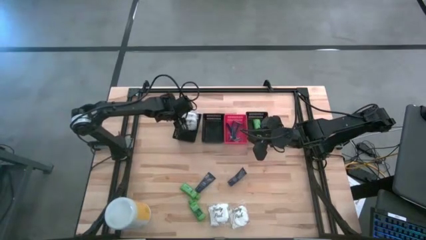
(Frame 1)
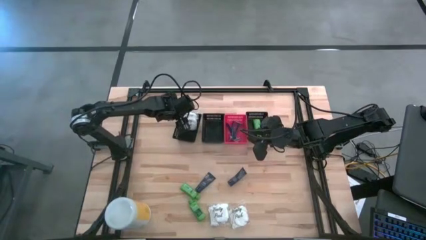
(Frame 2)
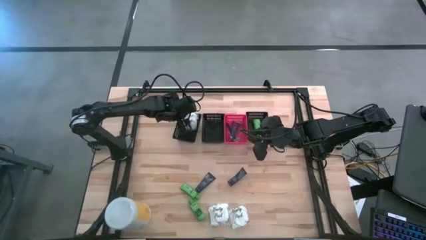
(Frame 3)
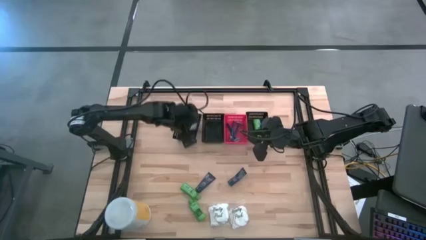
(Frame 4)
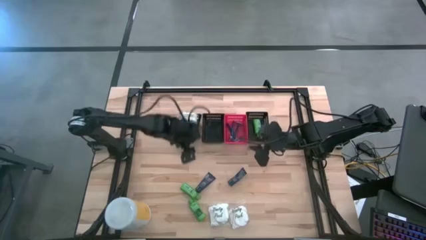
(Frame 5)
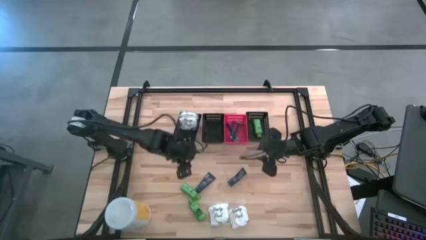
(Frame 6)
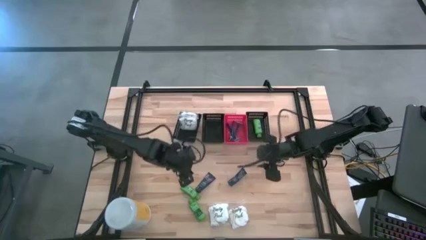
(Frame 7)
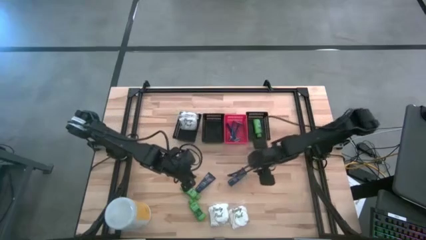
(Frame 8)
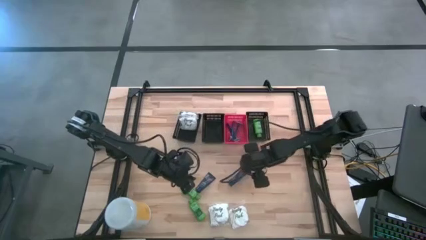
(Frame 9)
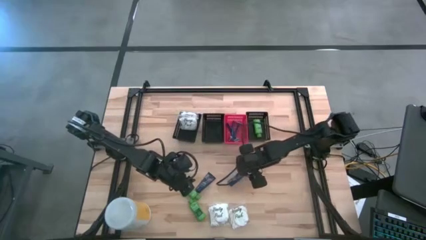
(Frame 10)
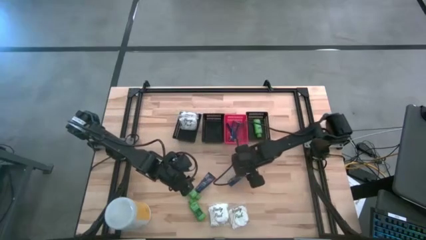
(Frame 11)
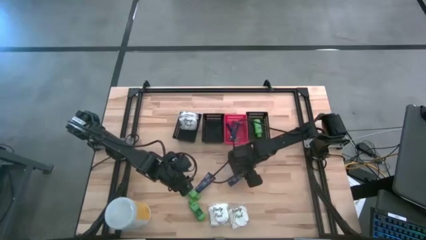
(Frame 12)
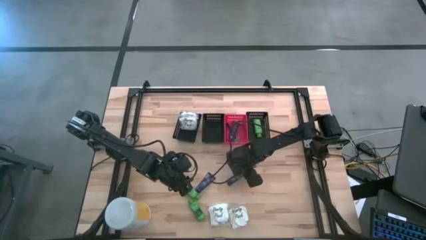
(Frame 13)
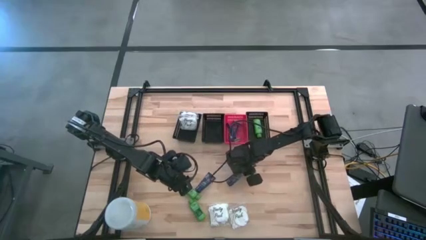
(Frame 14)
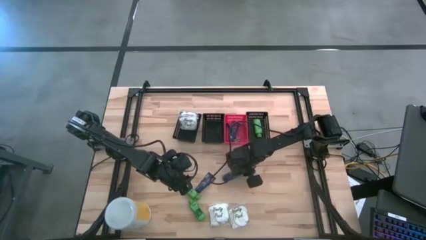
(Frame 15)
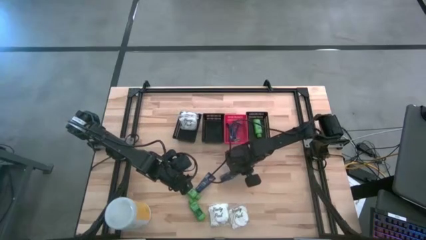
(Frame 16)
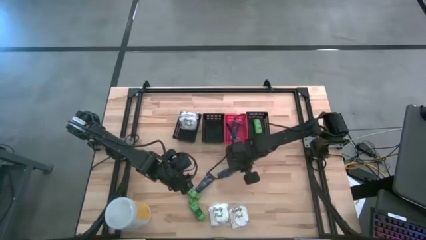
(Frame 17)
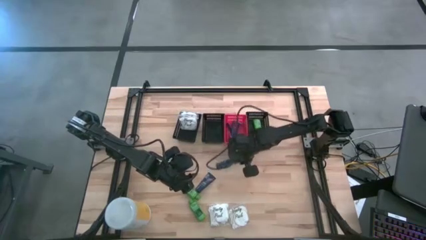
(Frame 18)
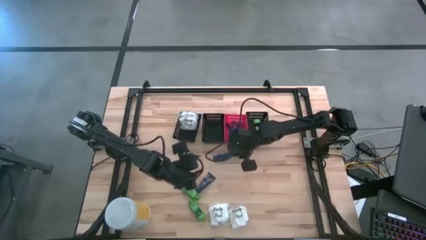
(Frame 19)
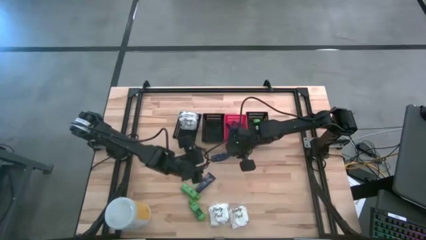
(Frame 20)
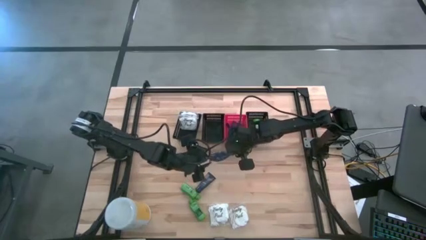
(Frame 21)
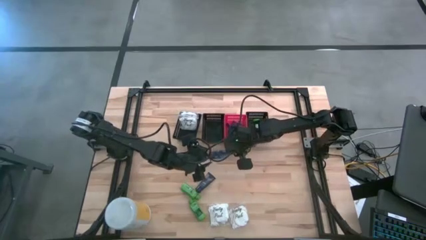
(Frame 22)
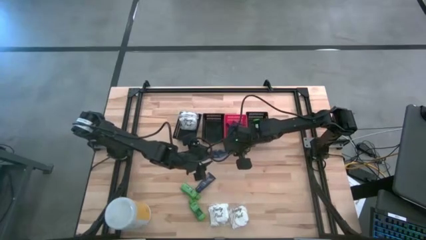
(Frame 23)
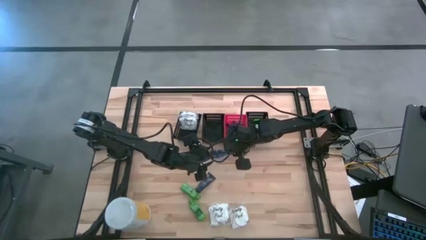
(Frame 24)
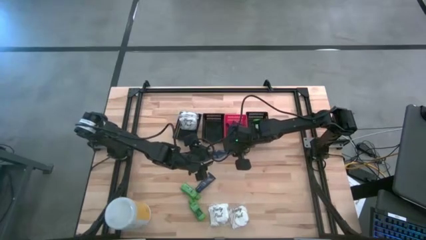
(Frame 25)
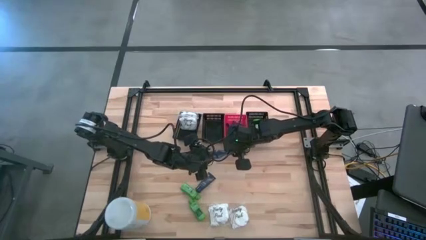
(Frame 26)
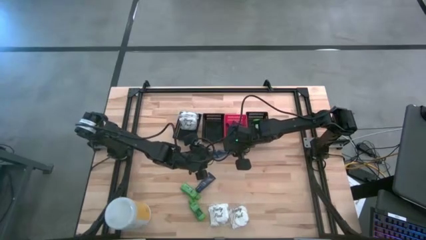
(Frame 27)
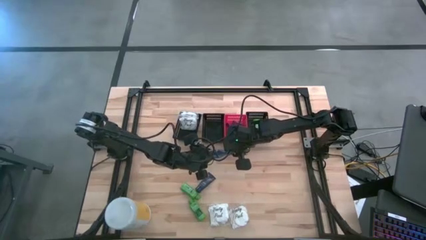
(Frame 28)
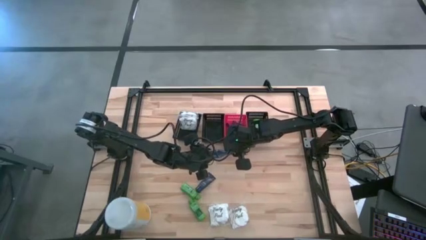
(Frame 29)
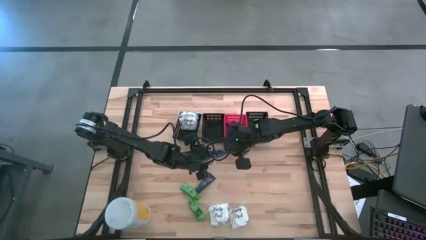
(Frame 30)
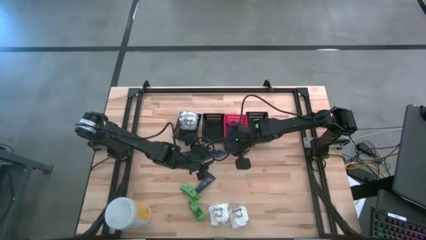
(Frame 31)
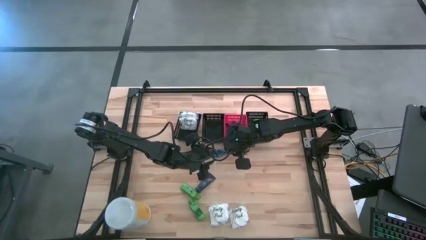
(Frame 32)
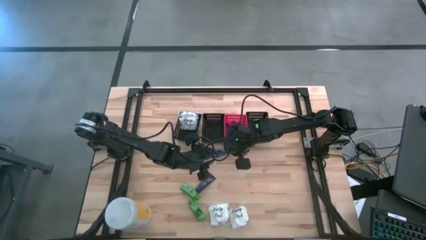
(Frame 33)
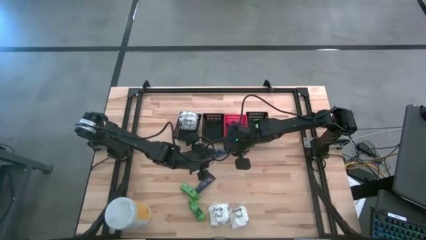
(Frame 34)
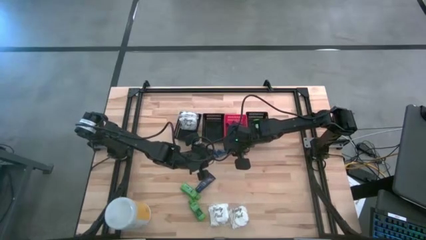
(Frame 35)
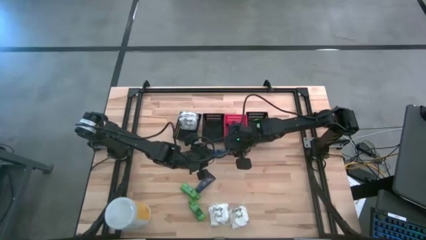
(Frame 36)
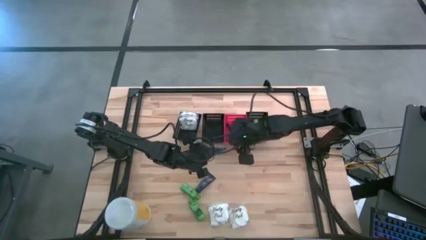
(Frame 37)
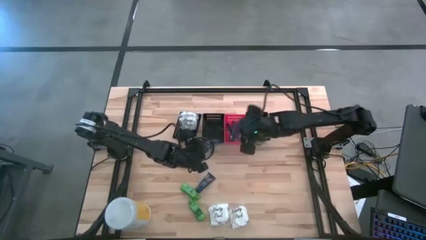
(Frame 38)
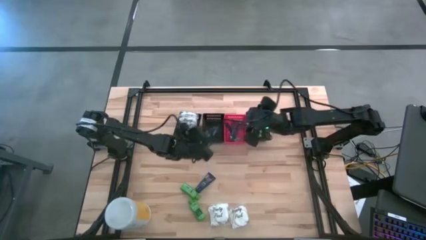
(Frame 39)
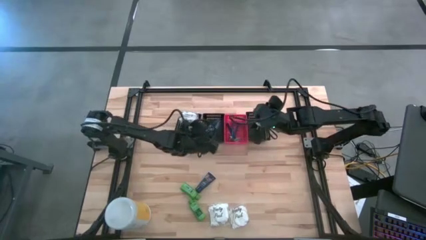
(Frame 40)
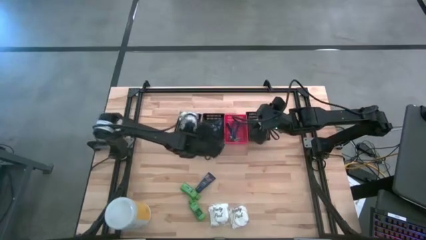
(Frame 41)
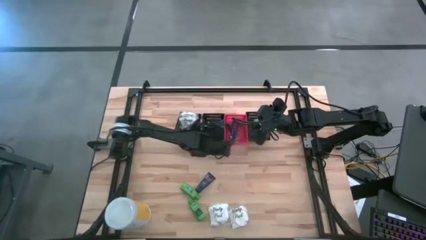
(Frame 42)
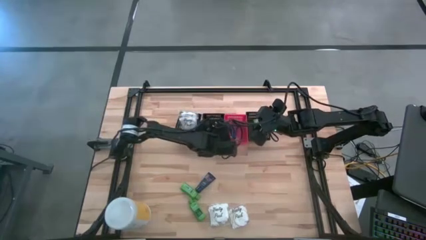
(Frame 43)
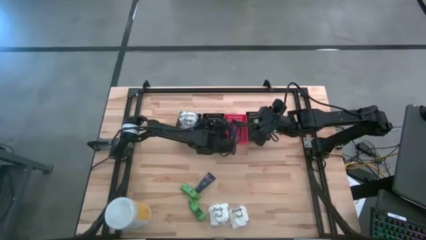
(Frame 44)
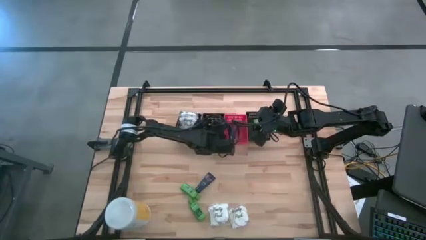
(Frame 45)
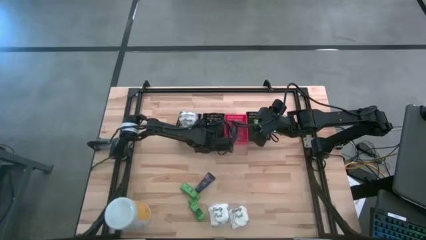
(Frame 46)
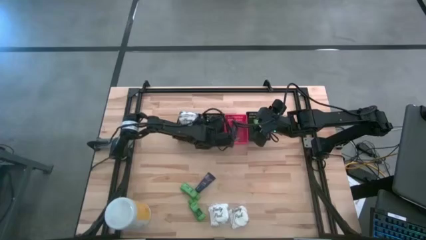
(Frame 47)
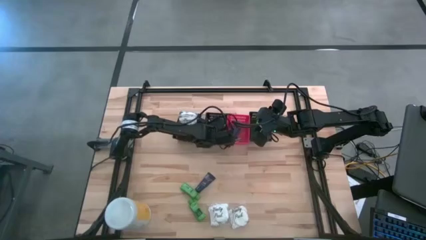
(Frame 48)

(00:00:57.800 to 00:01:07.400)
Task: Pick & Place Travel size toiletries
Put the shaving cream into the middle left black bin

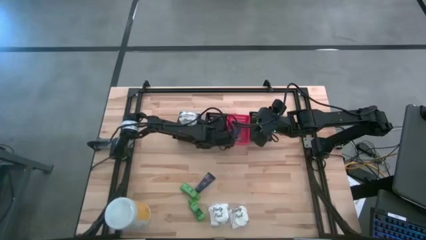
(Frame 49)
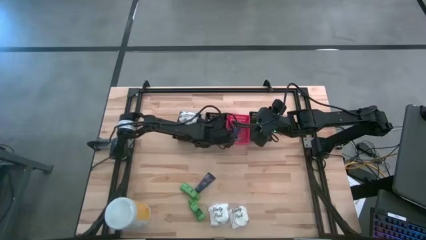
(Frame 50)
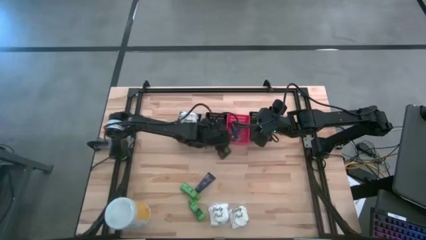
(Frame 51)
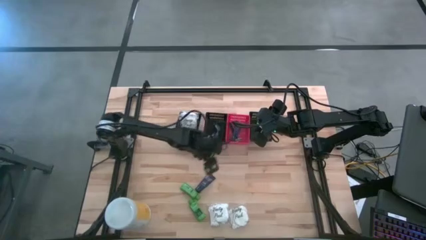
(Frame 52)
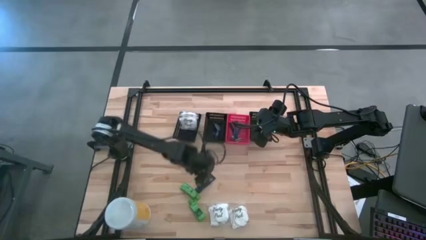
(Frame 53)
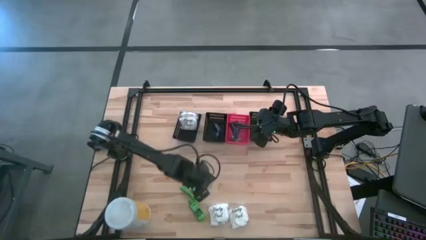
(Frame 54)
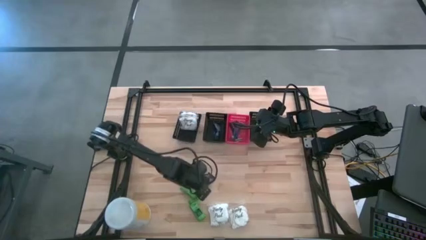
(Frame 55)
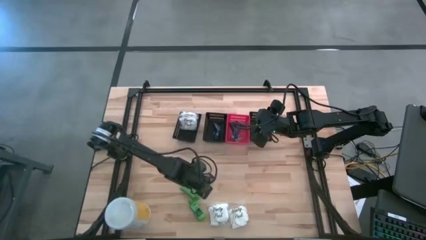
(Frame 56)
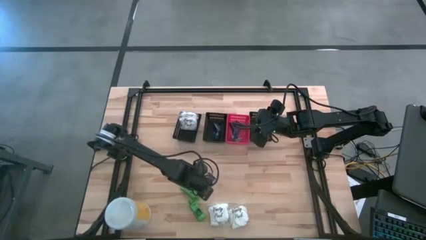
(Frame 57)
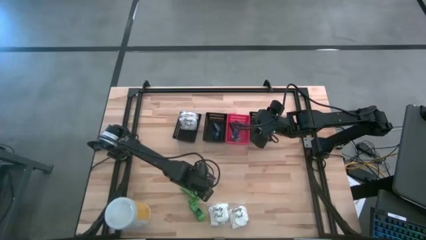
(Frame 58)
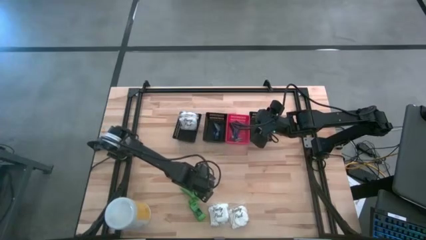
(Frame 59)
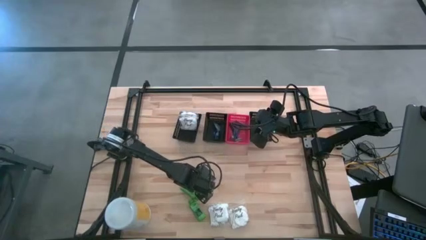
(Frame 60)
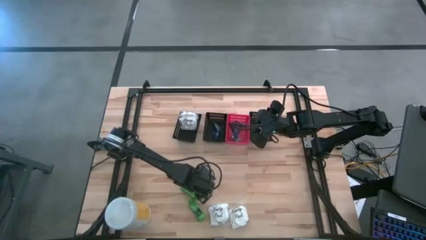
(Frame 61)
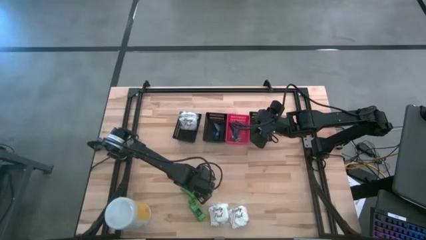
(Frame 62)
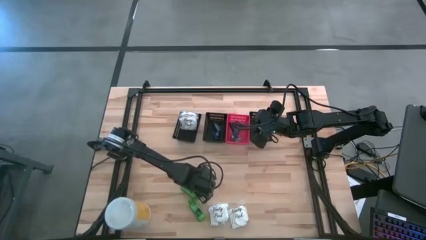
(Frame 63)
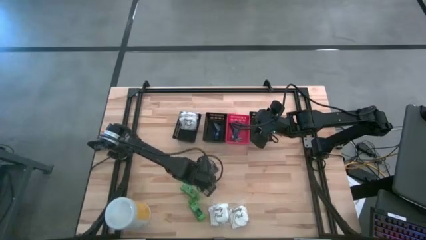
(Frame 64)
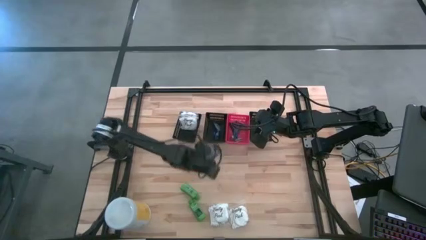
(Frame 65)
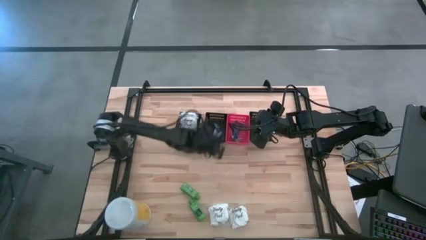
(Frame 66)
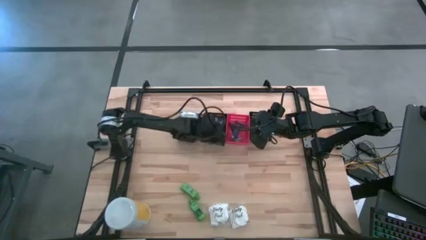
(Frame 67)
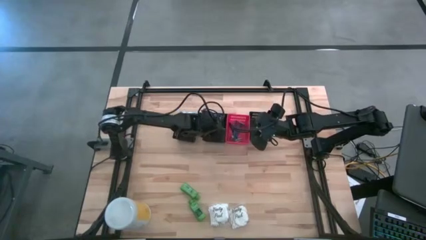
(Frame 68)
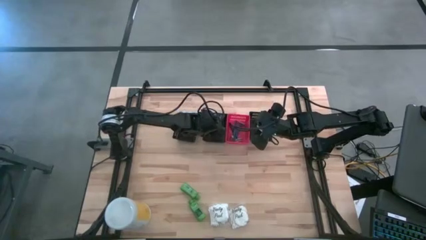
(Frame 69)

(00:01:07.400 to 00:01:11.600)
Put the shave cream into the middle left black bin

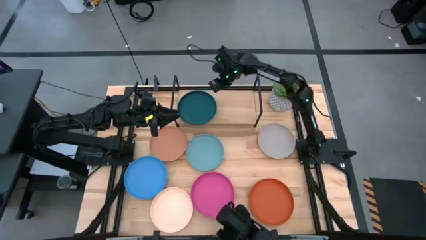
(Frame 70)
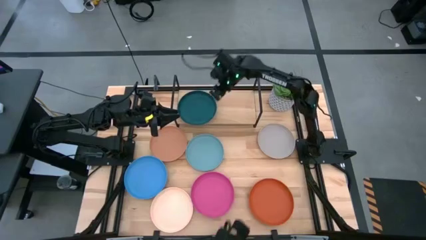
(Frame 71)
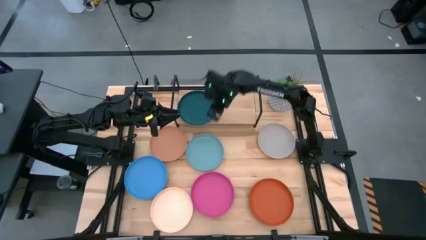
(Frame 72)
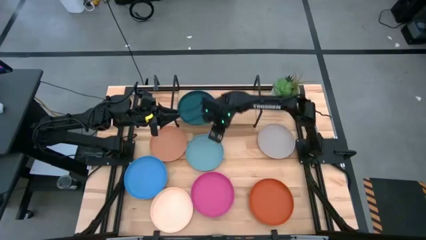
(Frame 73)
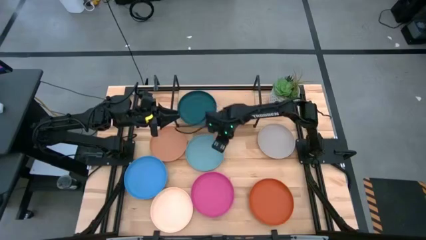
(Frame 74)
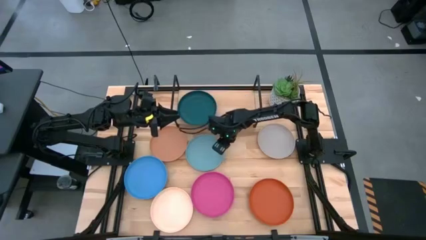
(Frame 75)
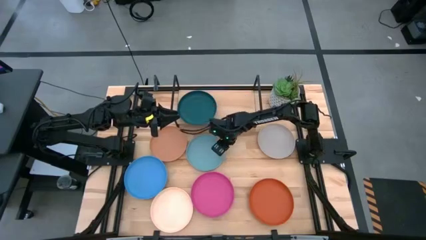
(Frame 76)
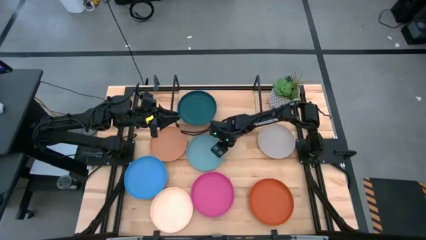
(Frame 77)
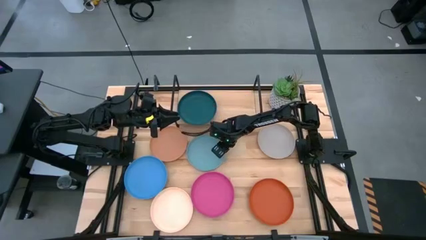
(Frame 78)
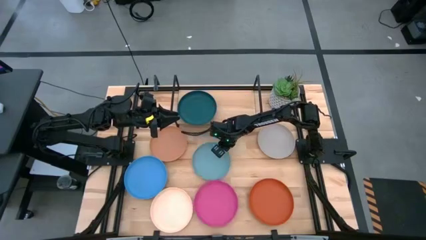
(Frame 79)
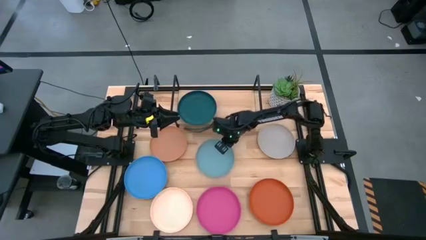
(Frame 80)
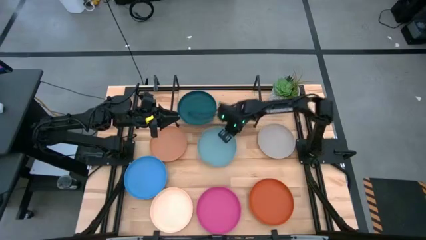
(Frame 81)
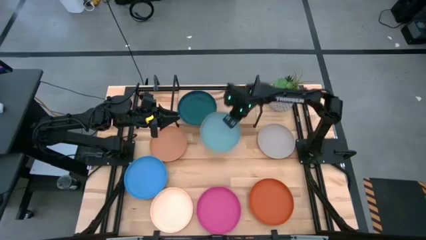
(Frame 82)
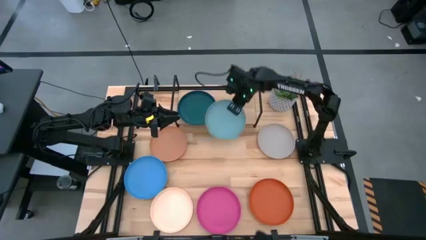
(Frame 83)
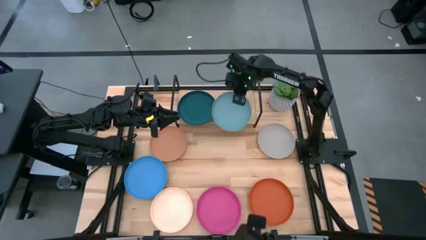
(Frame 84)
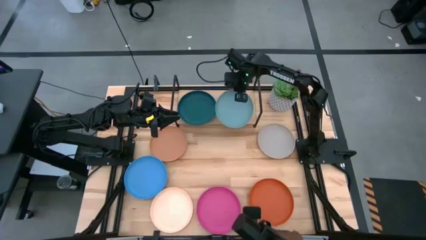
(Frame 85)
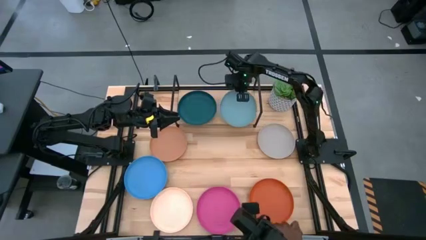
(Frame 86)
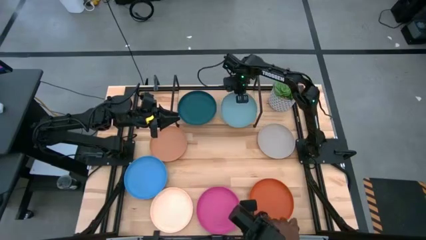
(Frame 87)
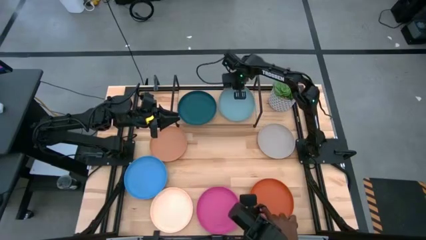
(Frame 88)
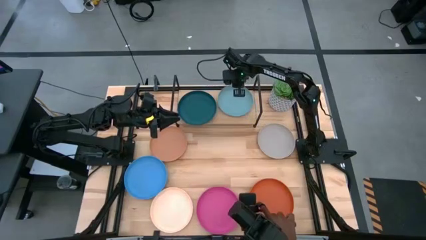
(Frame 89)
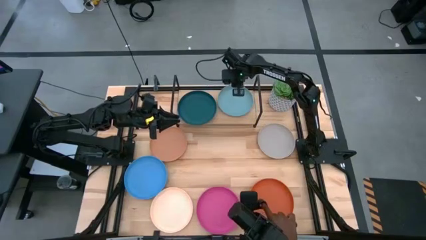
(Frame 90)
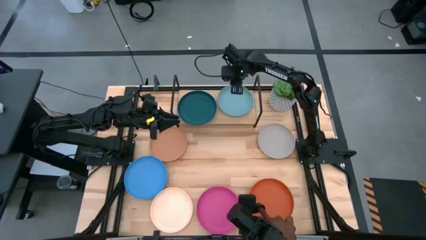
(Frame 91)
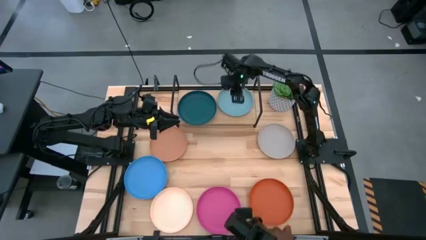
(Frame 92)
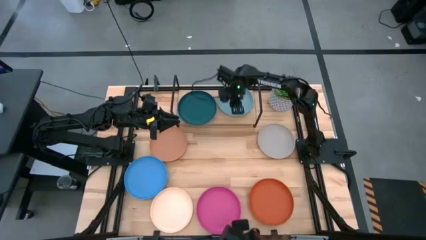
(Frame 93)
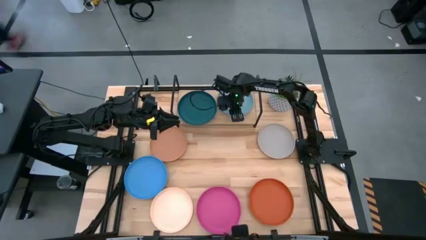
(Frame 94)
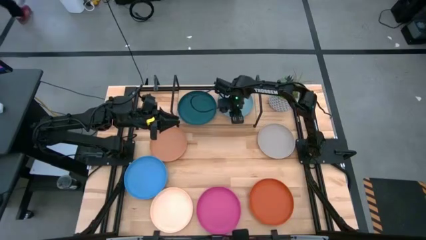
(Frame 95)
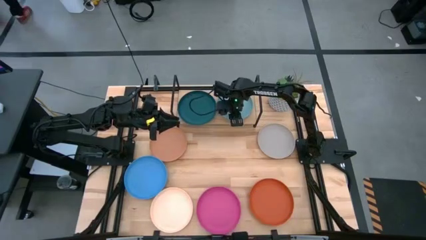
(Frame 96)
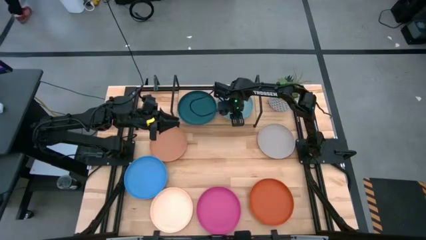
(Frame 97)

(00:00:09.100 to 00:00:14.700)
Task: Place and stack plates onto a shelf
Put the light blue plate on the shelf
